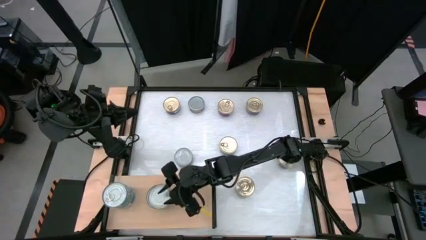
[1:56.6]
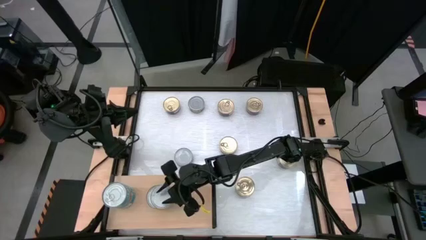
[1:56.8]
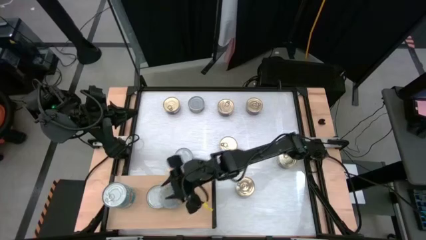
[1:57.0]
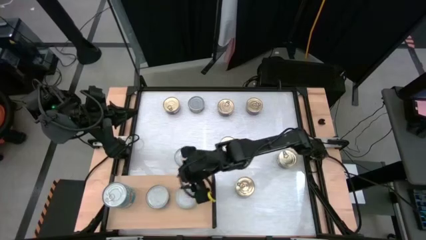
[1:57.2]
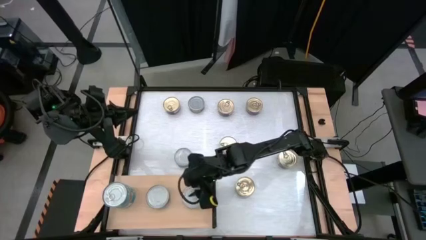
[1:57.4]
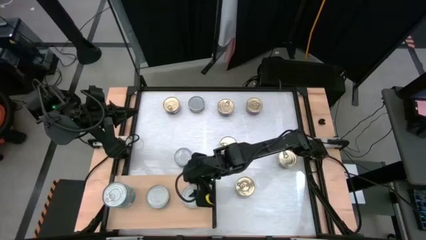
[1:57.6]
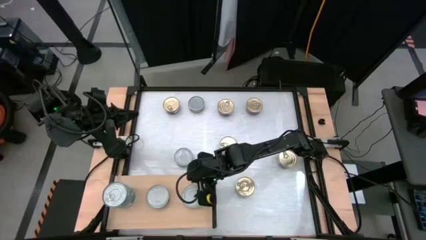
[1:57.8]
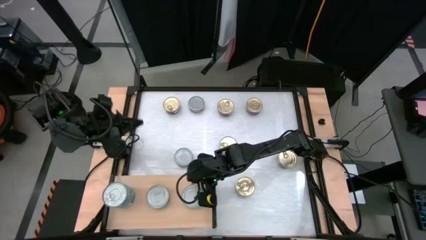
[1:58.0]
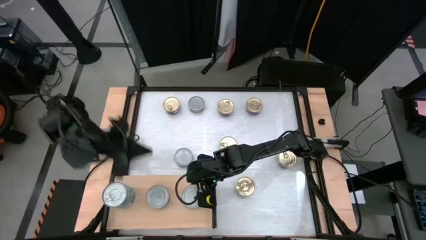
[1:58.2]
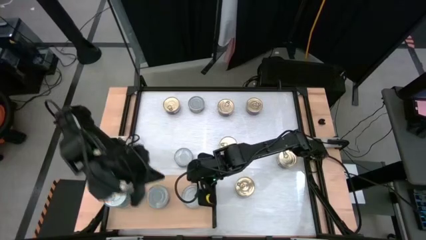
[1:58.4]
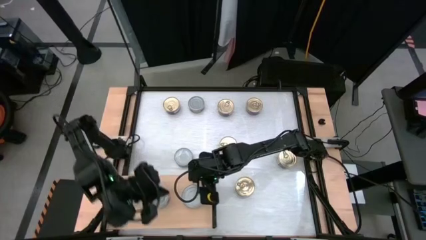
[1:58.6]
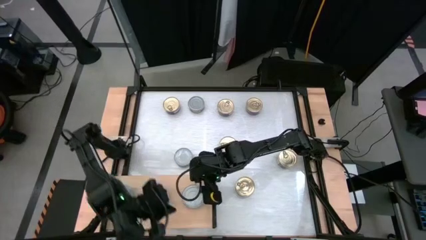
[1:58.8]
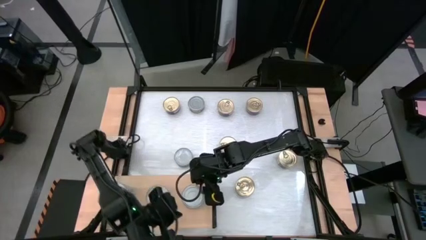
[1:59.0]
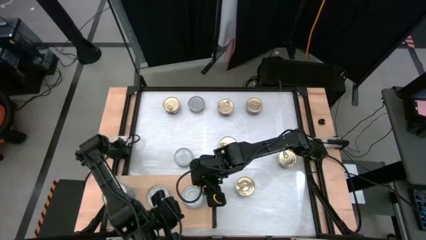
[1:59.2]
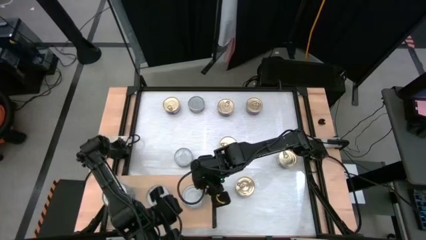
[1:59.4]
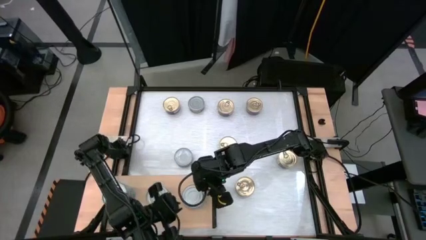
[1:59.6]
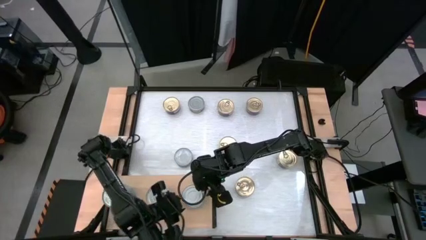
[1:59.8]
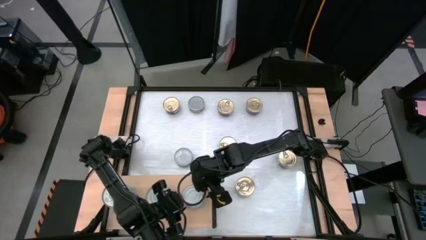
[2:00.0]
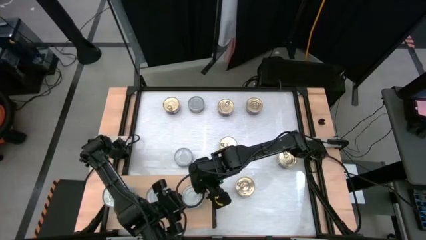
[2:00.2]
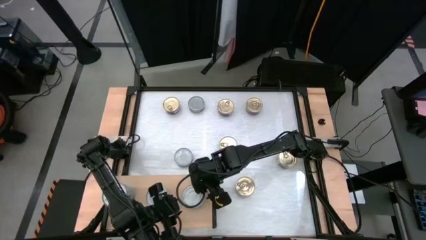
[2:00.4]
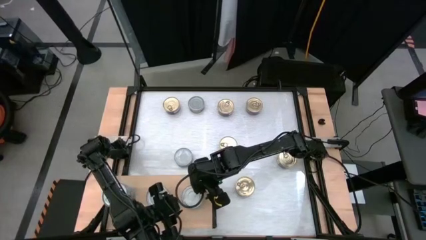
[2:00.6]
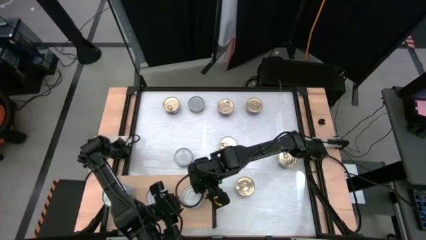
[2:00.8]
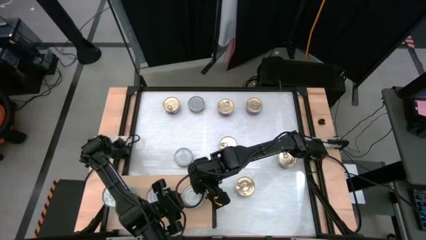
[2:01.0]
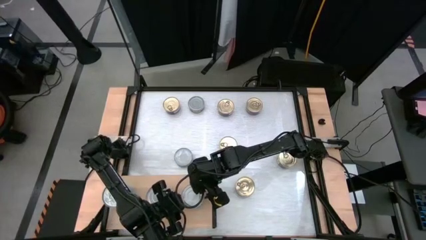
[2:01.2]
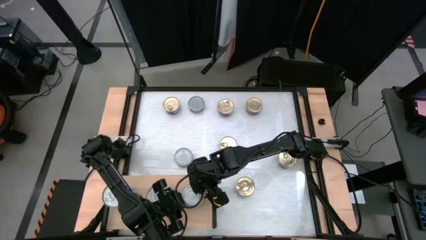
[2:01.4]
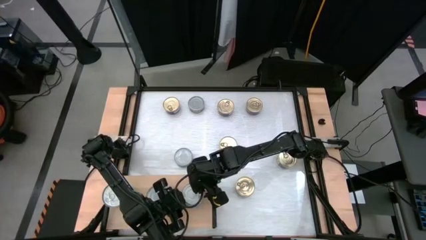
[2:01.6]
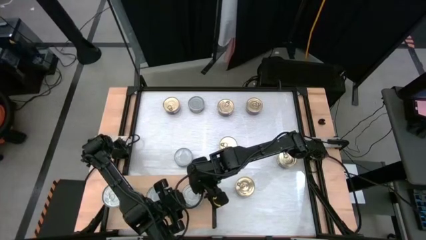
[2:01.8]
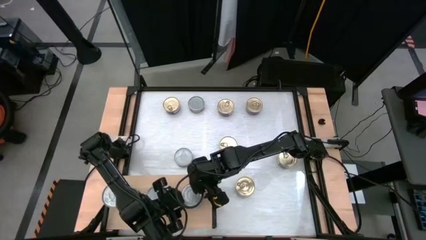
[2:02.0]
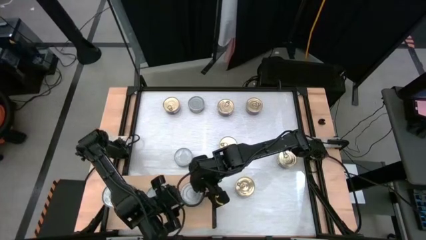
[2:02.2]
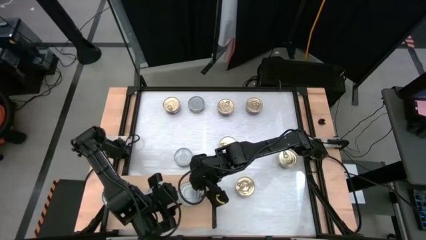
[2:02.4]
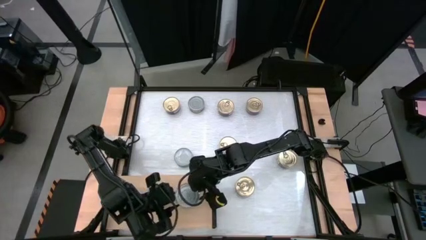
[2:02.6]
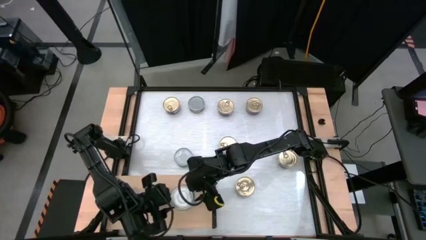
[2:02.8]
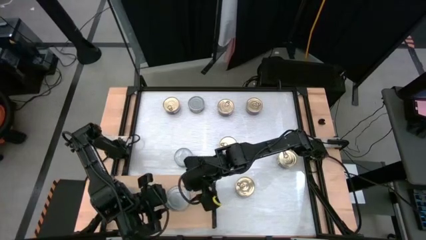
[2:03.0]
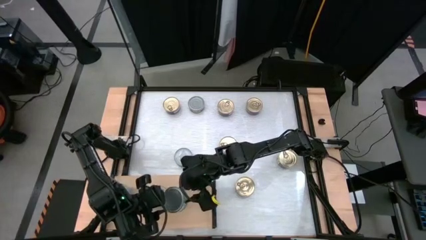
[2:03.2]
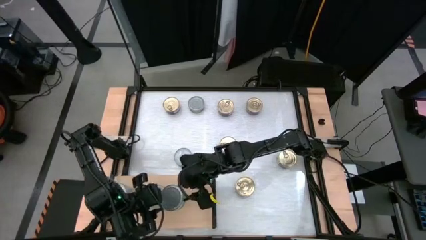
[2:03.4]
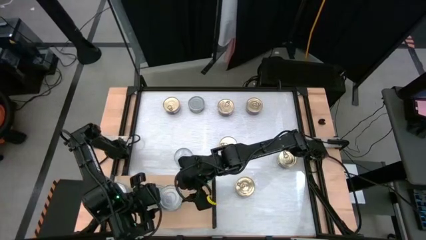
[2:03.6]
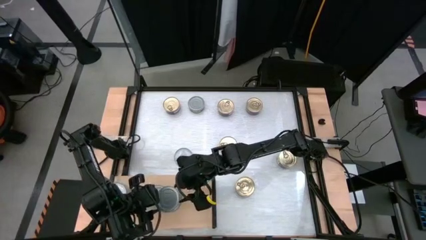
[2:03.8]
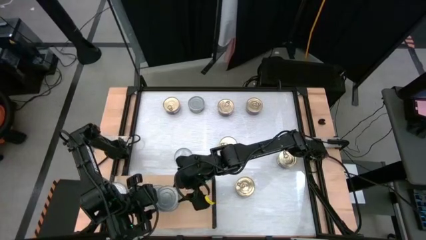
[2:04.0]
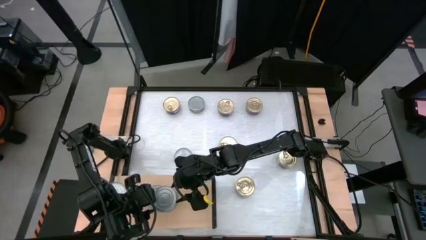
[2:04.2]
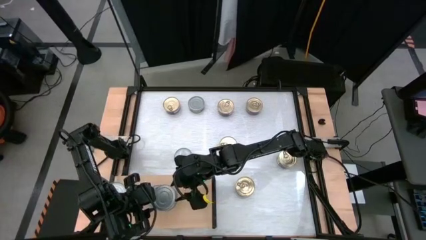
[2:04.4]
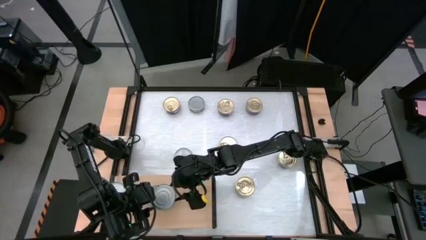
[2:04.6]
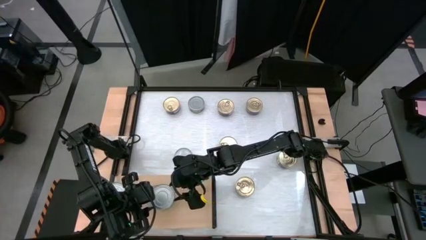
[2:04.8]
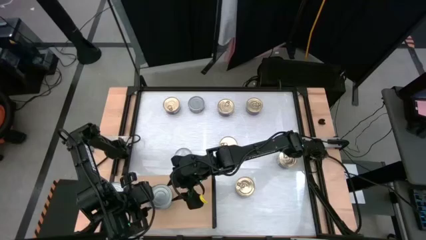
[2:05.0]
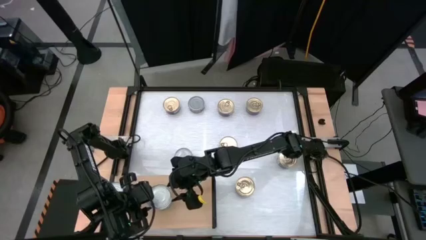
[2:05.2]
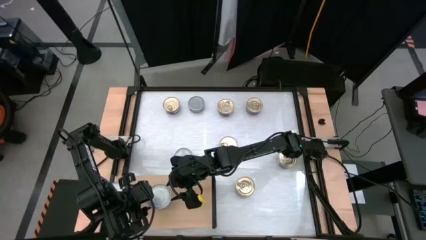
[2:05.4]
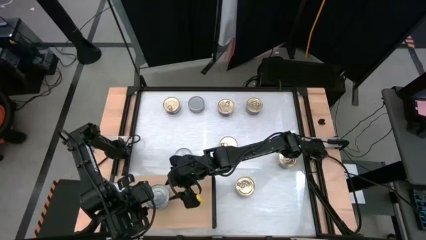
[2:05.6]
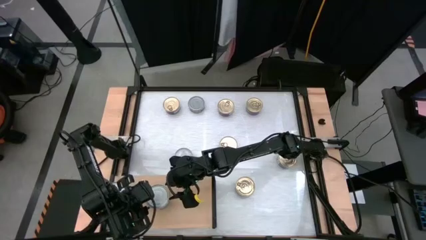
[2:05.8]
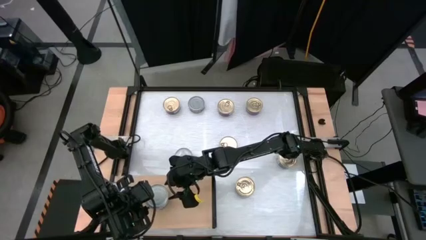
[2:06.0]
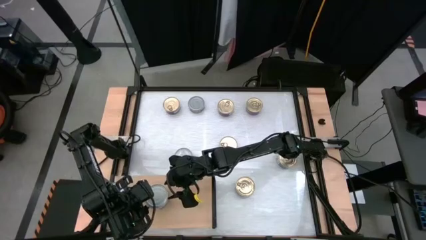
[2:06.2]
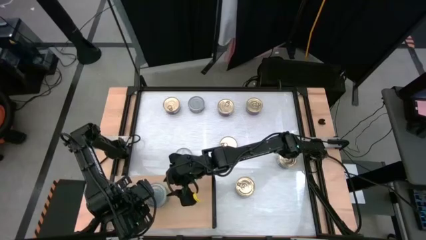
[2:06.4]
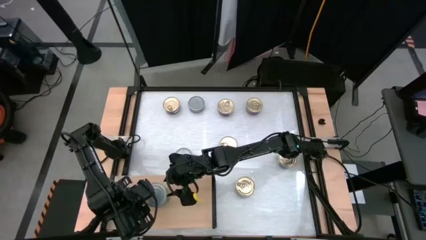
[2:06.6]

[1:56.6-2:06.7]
Task: Stack canned seafood by type on shelf
Stack the green tuna can on top of the green tuna can on the shelf

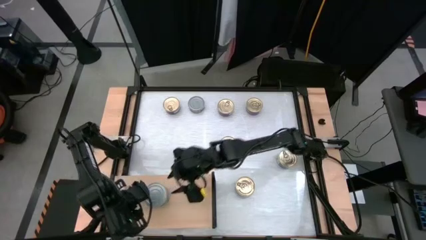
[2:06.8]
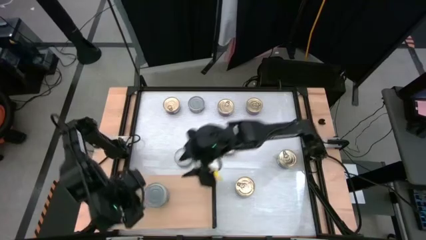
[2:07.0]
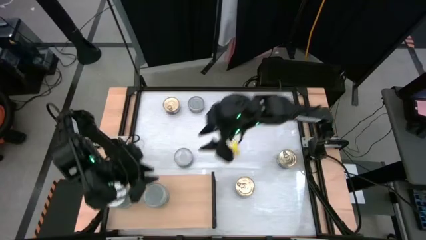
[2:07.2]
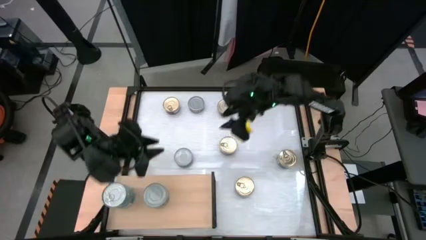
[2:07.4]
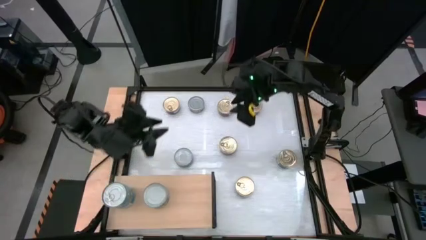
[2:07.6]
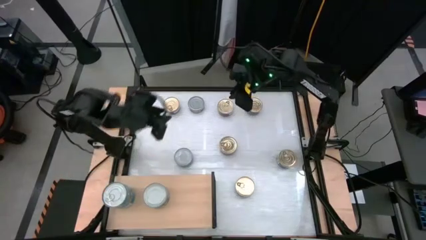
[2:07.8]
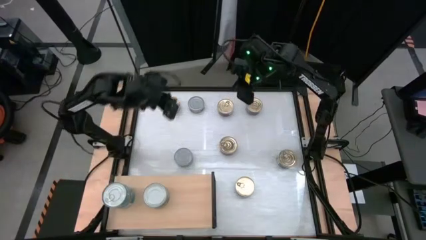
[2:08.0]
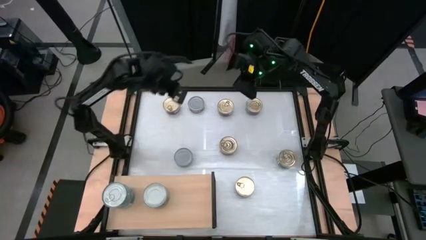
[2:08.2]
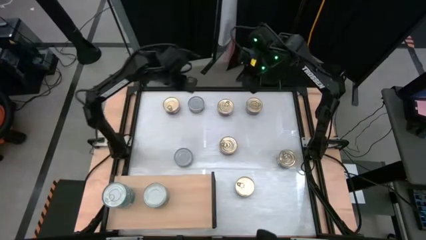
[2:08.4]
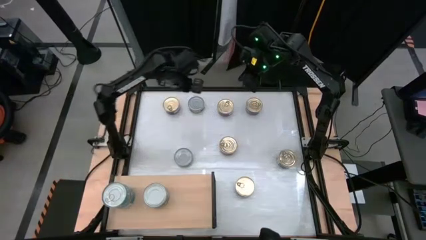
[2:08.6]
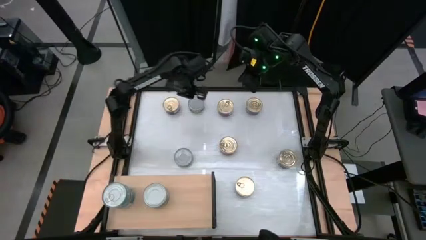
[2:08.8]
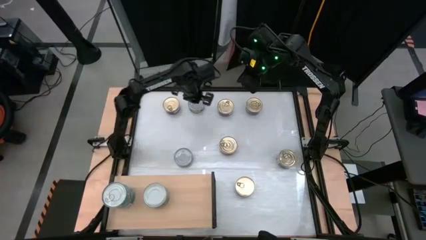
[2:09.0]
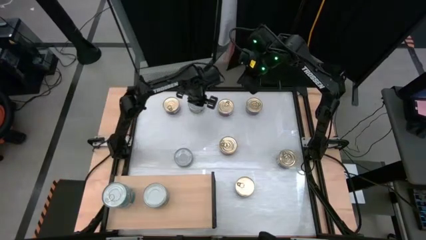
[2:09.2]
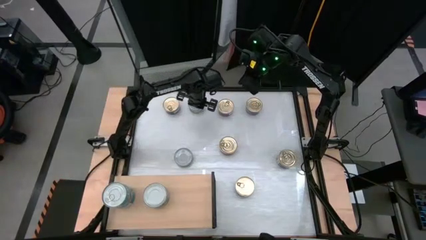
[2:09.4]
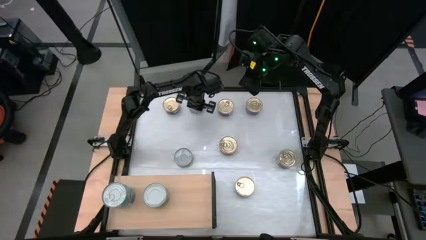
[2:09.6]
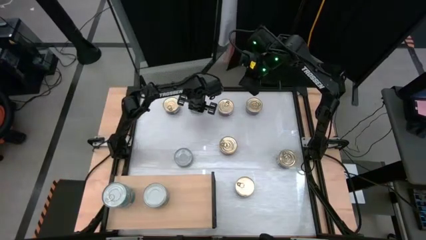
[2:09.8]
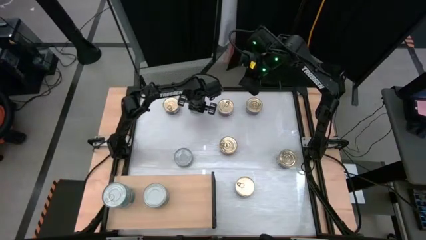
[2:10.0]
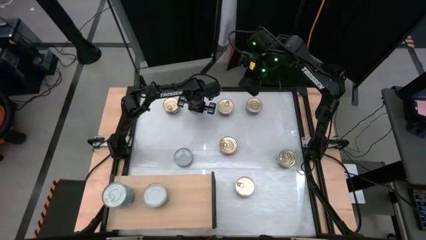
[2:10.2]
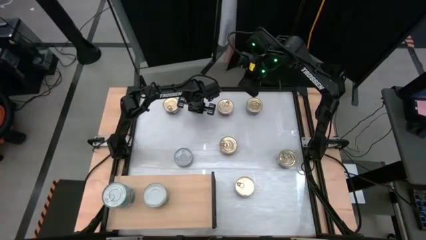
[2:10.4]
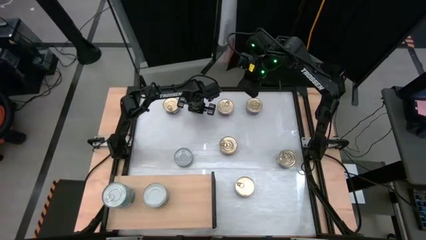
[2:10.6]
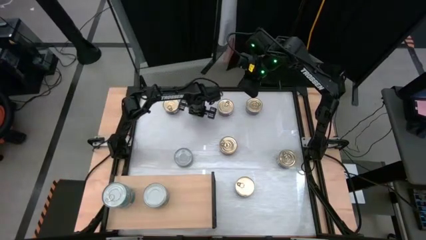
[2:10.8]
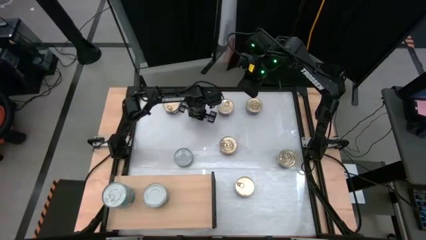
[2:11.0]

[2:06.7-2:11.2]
Stack the green tuna can on top of the green tuna can on the shelf
